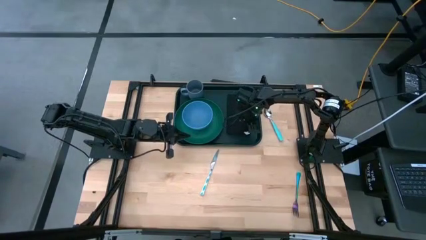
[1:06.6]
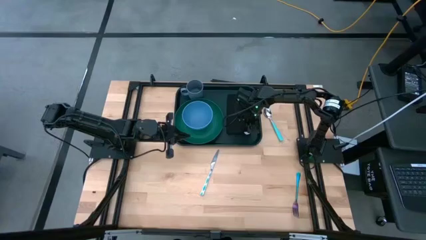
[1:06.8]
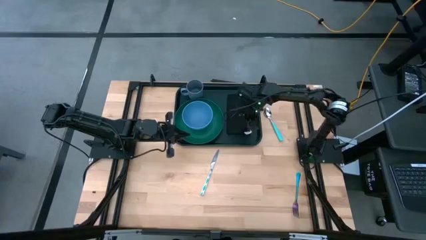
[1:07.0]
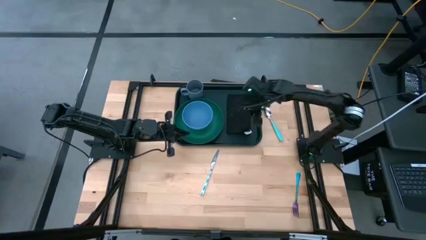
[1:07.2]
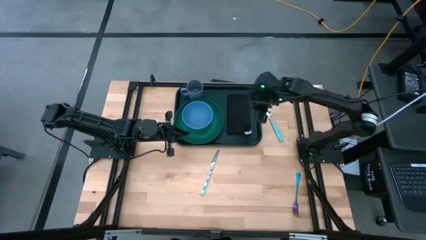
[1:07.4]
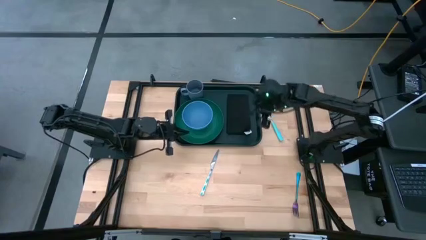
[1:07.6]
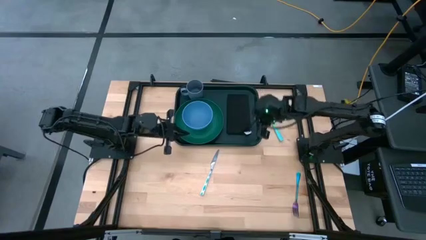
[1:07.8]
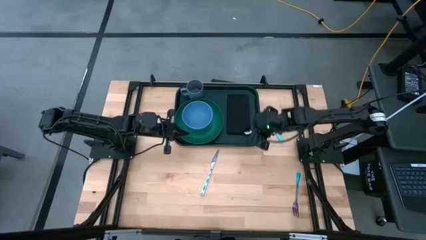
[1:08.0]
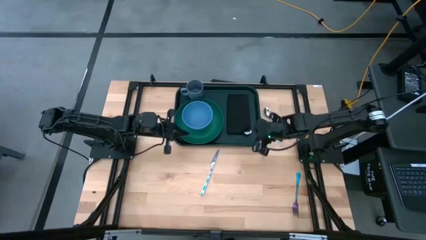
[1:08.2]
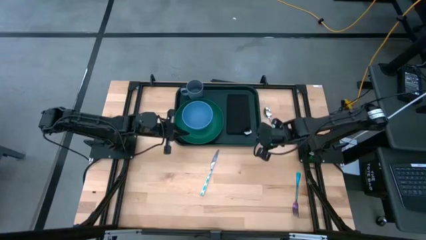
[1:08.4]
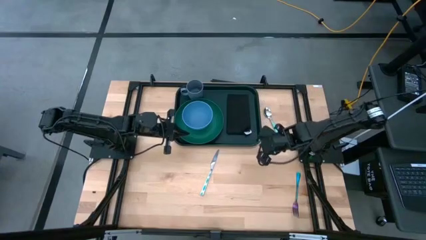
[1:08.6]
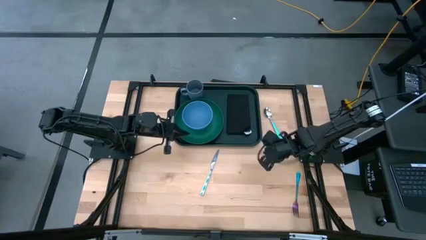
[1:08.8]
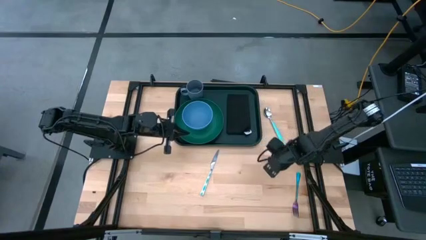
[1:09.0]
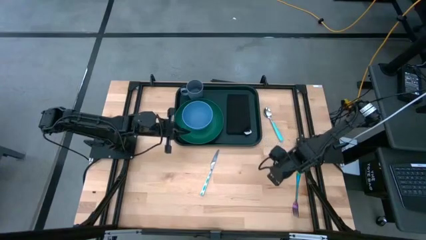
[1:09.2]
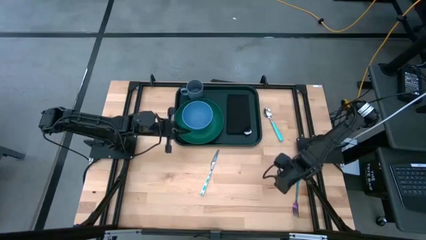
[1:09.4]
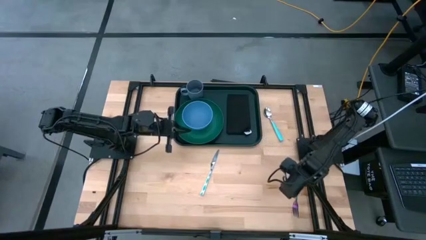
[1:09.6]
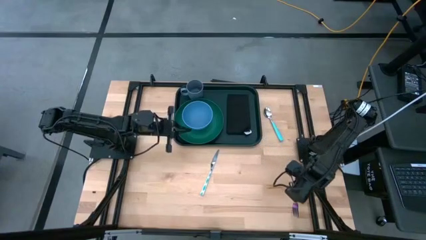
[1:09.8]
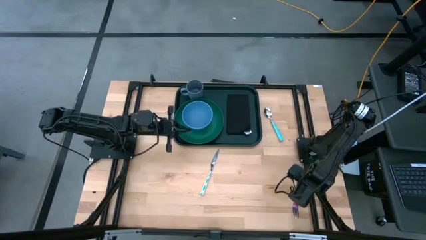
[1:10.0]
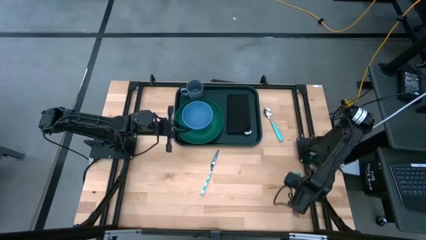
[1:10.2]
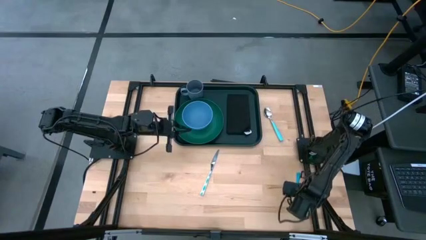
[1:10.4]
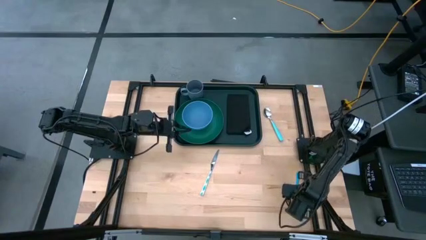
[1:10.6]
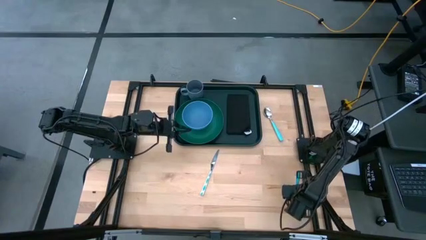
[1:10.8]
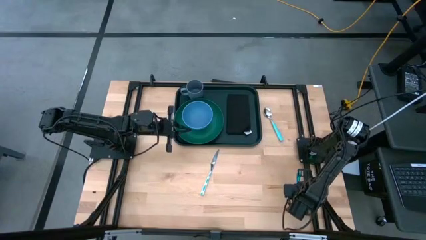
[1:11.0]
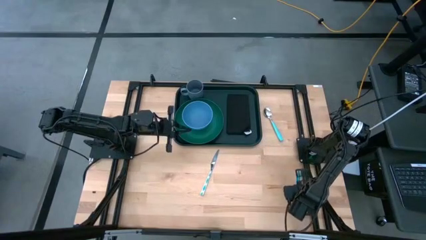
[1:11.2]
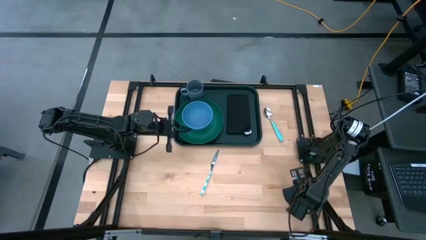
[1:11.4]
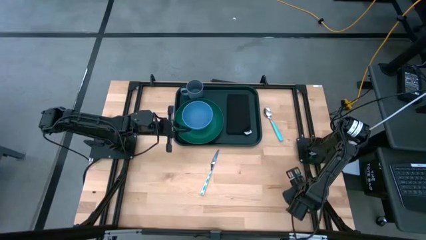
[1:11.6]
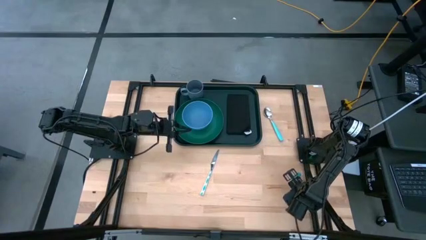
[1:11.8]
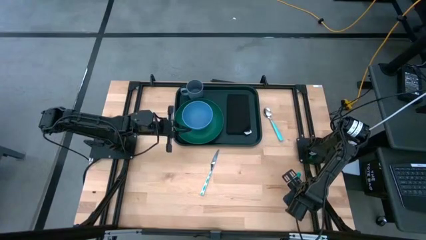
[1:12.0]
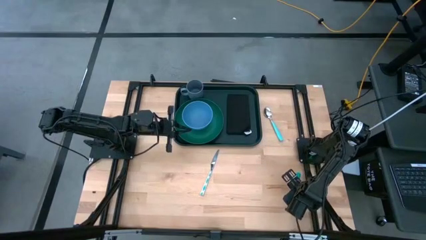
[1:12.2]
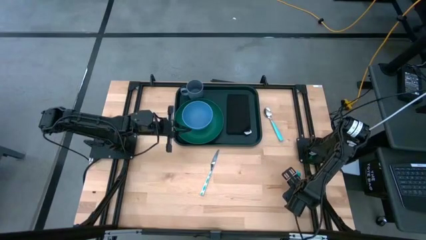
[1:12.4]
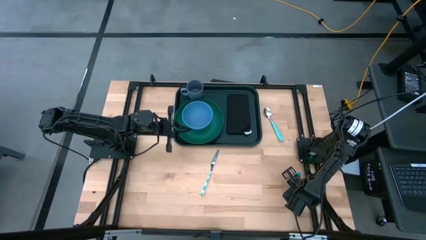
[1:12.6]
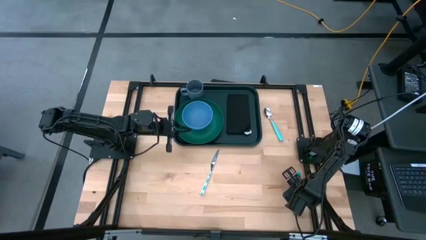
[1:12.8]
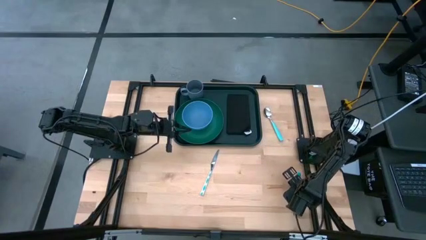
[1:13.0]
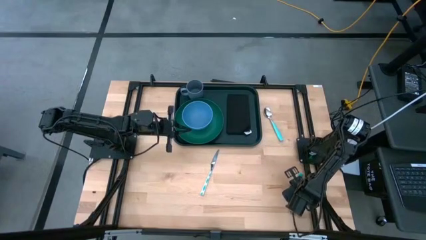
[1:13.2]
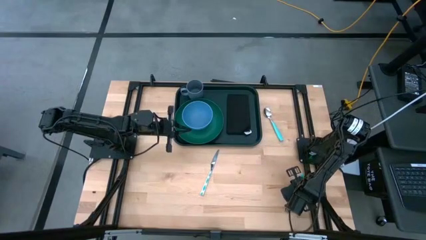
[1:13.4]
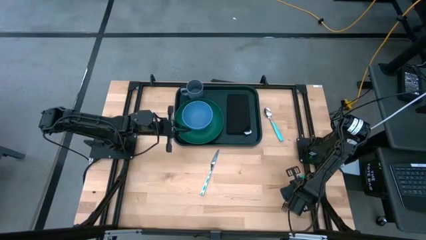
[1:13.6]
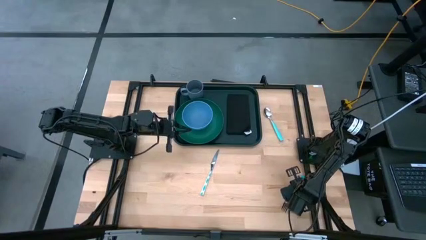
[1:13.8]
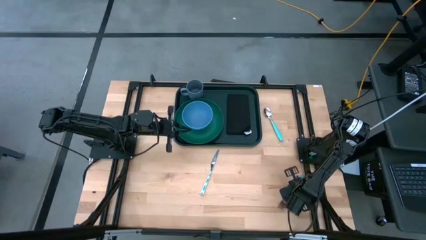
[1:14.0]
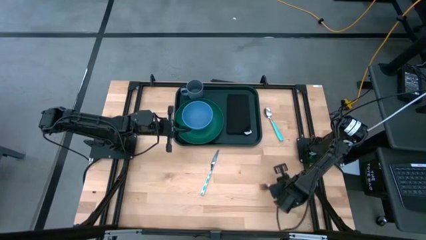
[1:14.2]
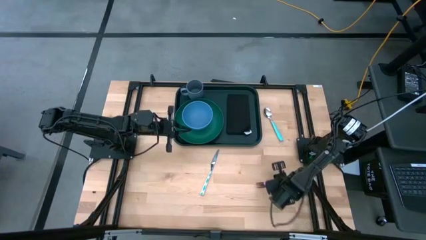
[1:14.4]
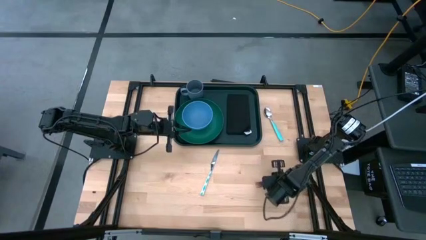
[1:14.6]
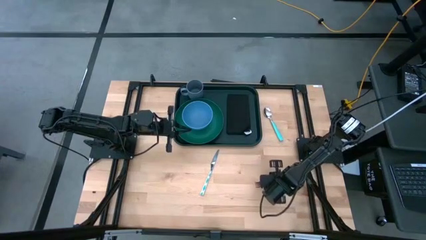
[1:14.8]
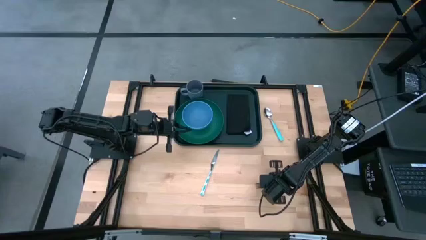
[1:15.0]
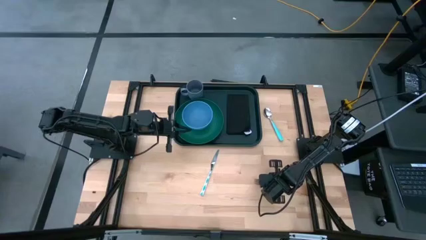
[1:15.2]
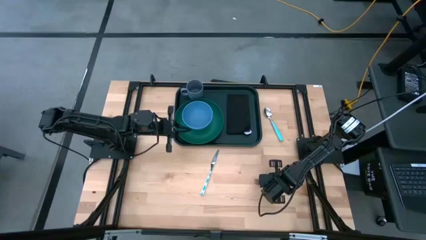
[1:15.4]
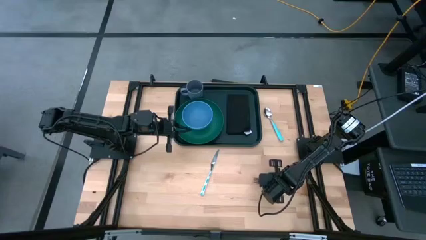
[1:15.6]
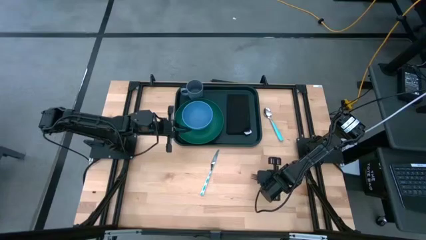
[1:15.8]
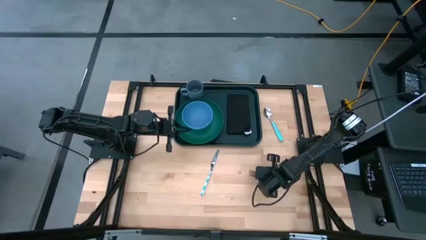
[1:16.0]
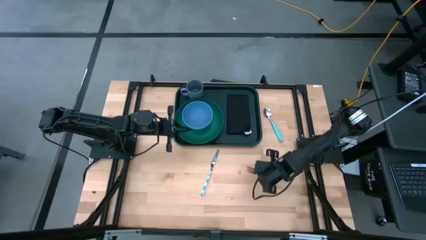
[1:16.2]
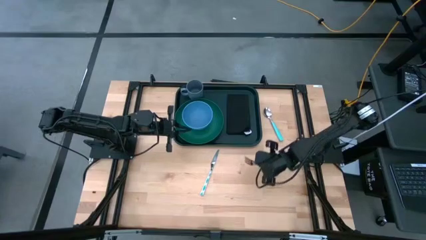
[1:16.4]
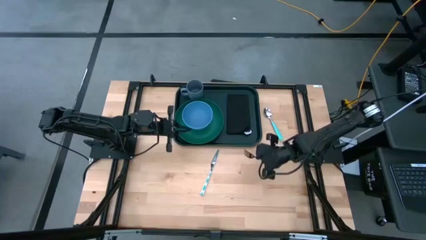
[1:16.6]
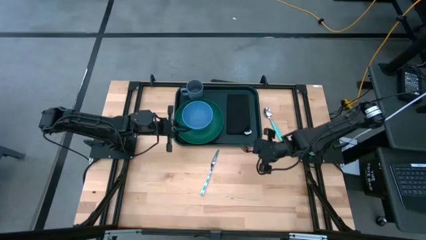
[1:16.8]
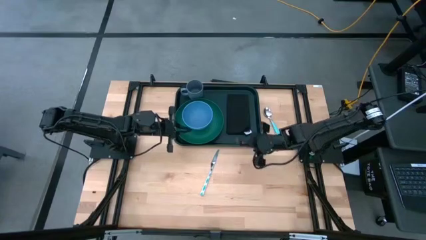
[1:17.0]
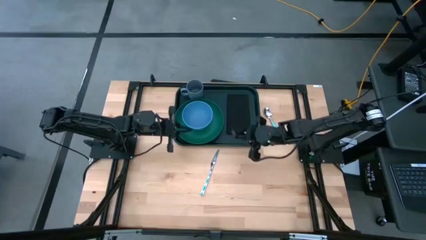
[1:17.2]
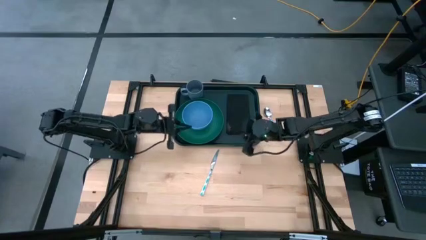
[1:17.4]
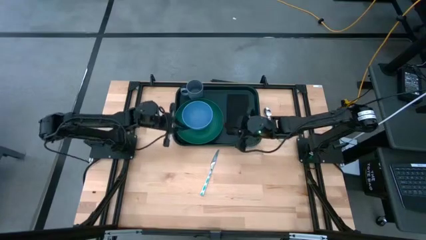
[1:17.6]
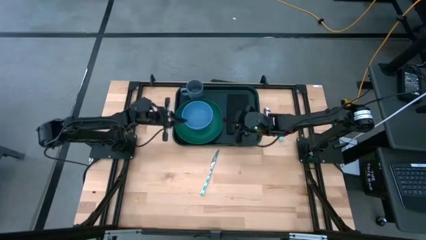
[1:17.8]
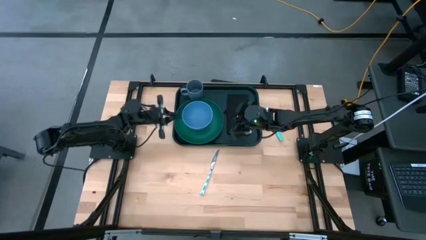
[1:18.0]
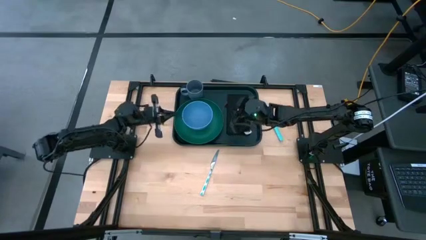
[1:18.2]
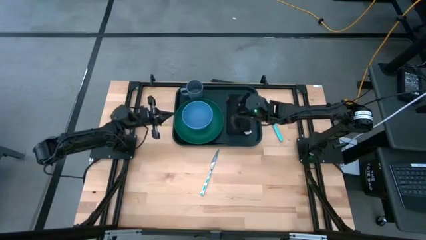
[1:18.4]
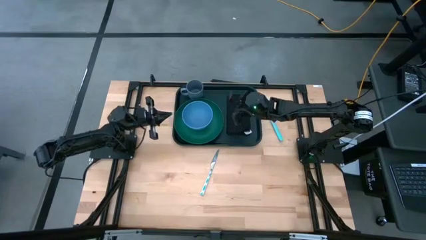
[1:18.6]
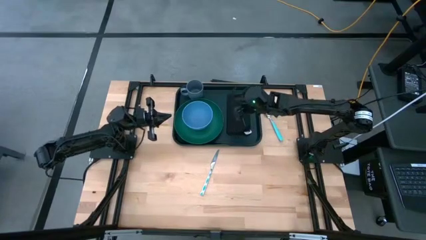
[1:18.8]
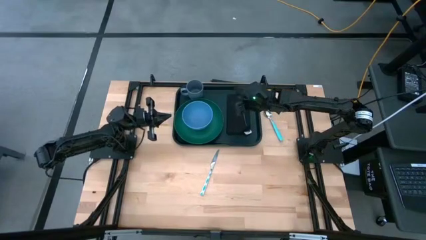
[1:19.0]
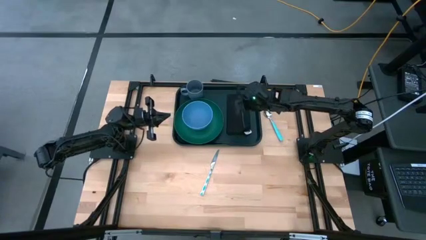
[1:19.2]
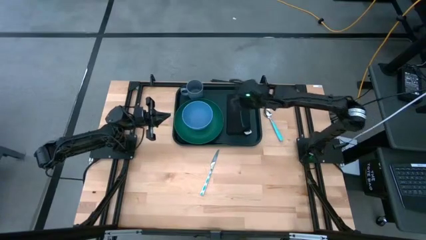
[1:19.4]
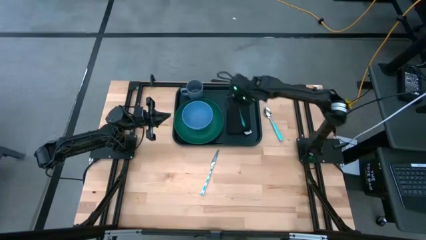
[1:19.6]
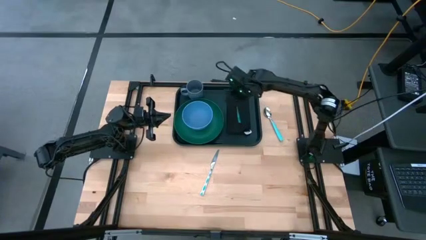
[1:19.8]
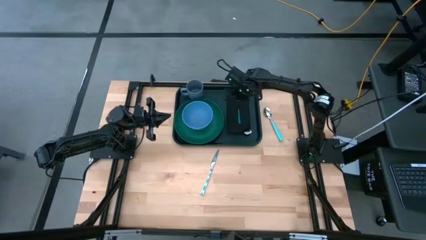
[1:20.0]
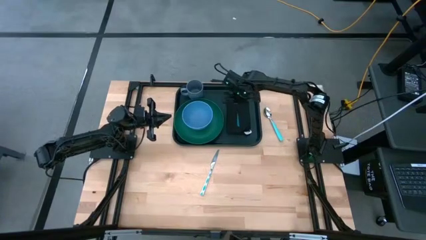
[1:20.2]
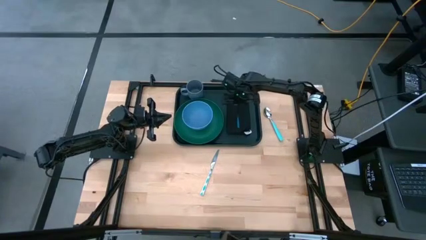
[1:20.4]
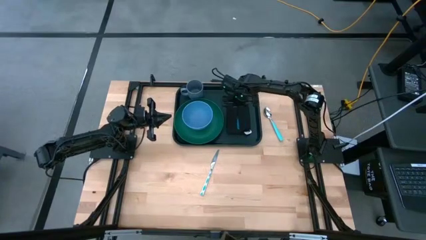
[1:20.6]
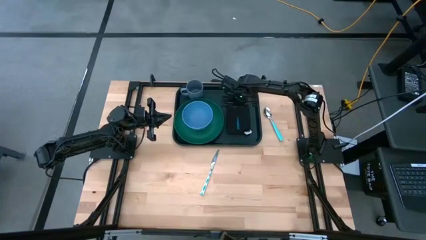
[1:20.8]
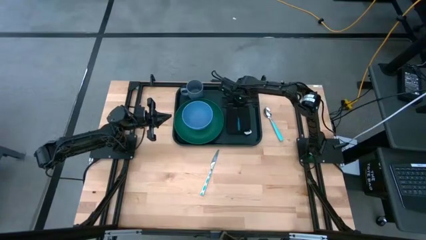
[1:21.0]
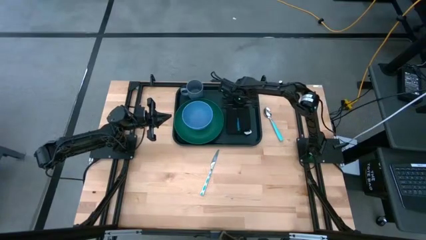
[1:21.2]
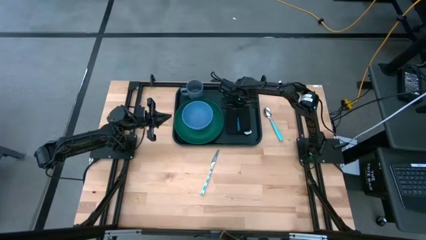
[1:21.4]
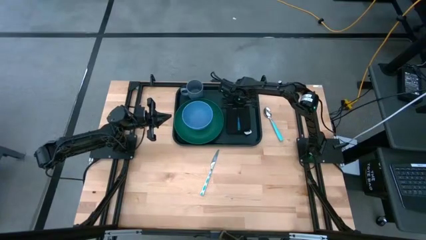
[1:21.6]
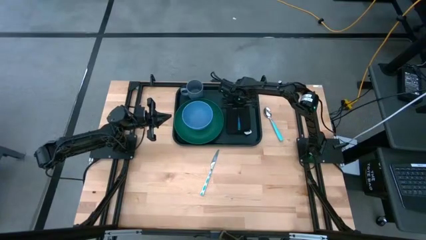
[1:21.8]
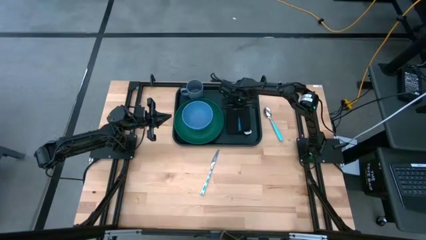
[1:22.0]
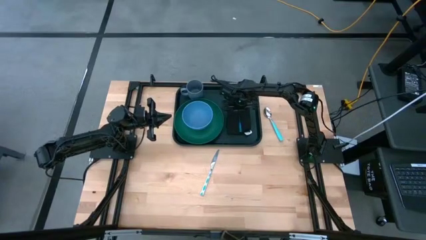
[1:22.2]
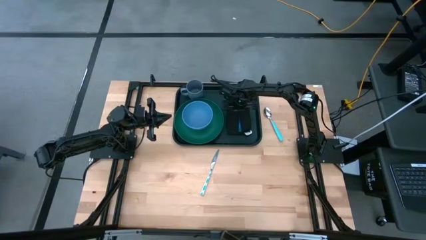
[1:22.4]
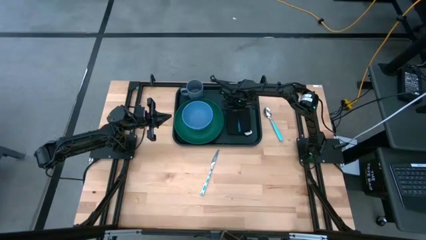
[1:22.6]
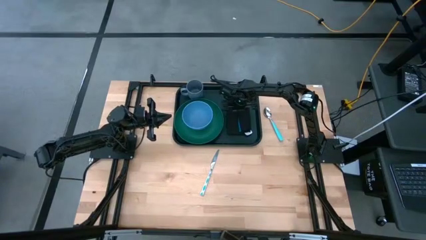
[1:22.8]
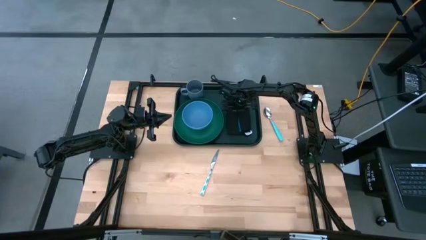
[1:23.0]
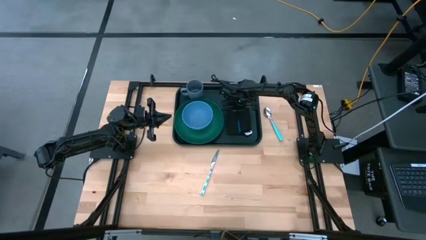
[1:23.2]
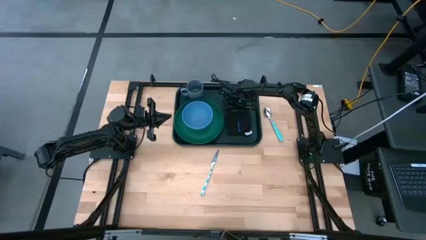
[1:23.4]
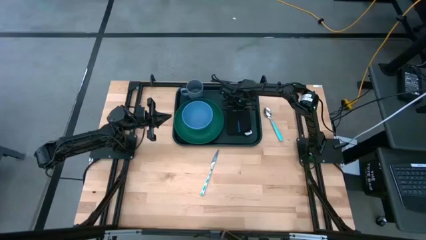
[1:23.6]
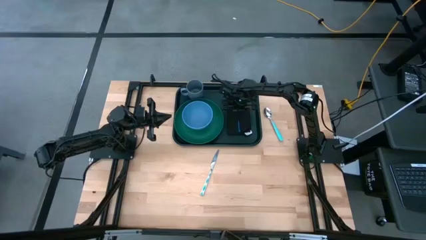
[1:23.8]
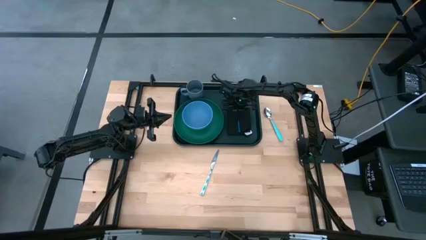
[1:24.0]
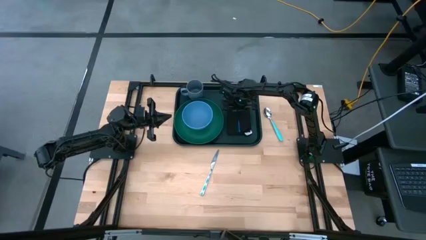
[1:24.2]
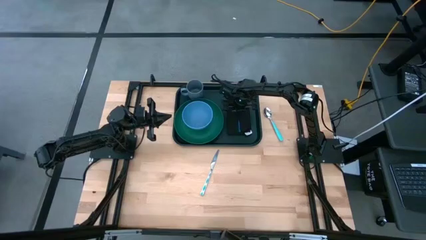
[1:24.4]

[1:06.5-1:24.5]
Task: Set up tray
Put the blue fork on top of the black napkin on the green tray
